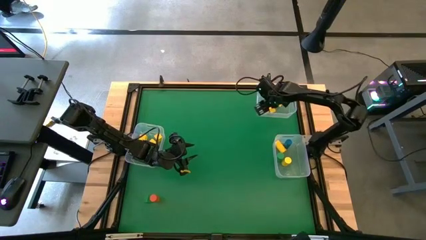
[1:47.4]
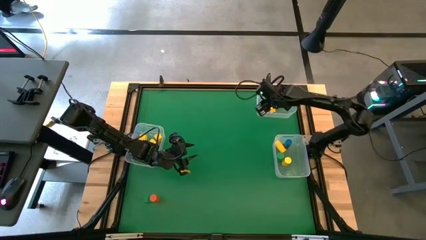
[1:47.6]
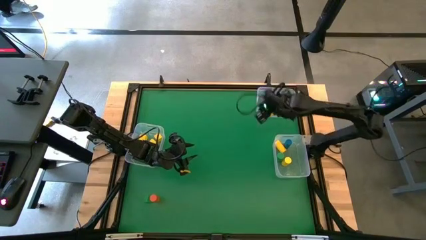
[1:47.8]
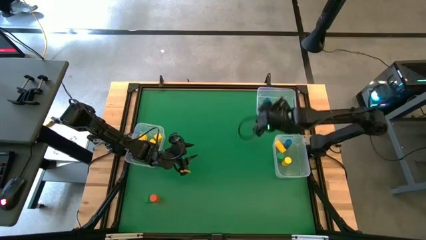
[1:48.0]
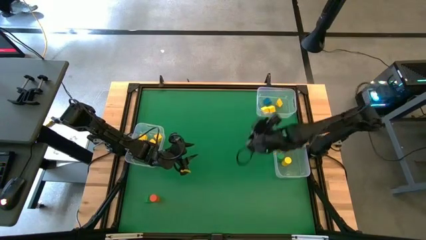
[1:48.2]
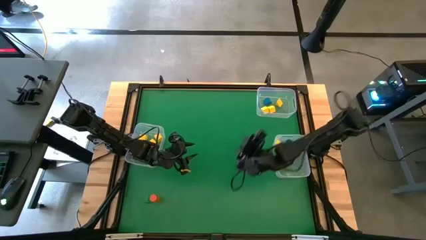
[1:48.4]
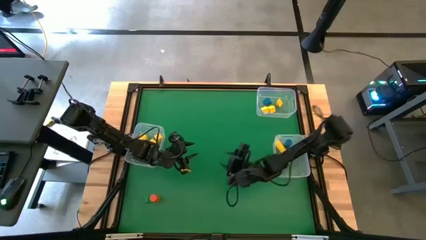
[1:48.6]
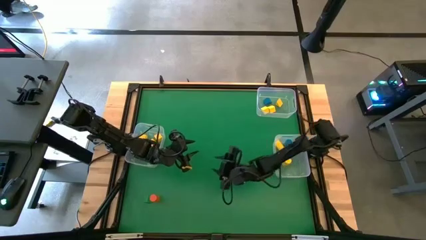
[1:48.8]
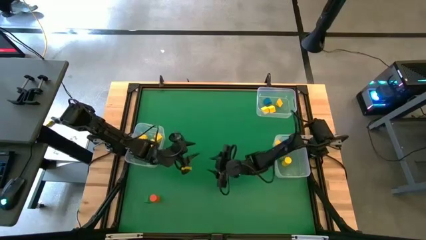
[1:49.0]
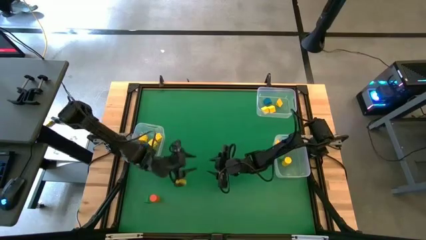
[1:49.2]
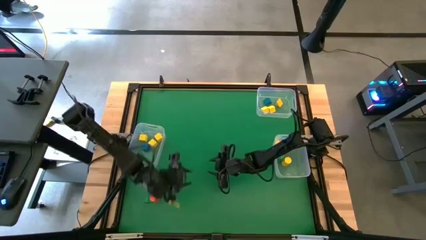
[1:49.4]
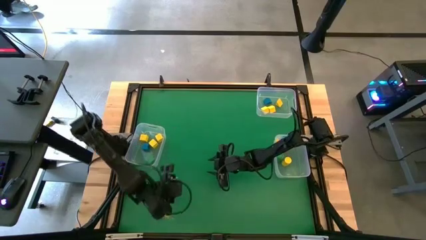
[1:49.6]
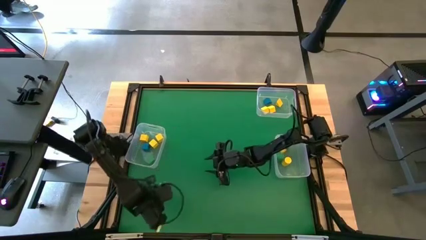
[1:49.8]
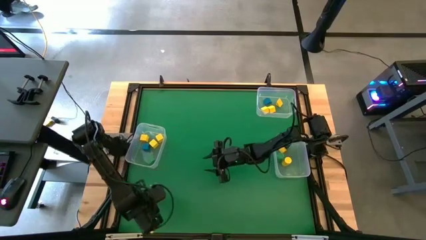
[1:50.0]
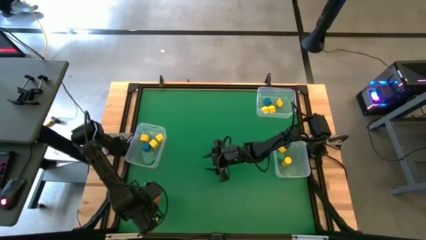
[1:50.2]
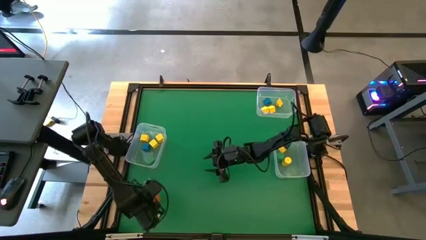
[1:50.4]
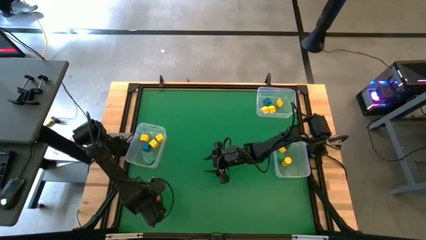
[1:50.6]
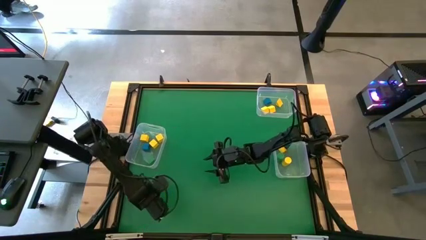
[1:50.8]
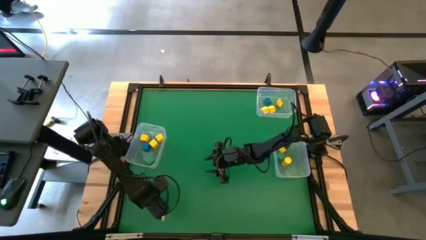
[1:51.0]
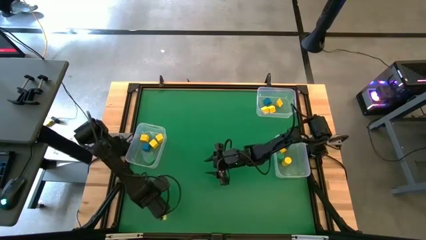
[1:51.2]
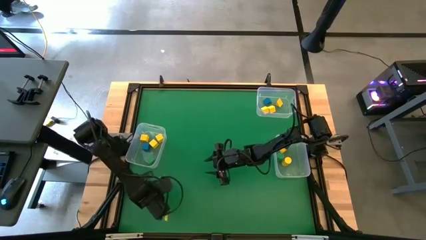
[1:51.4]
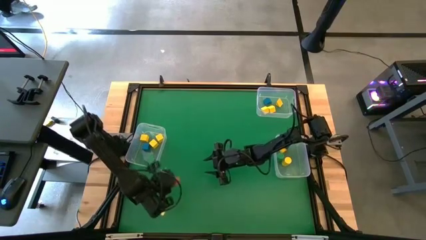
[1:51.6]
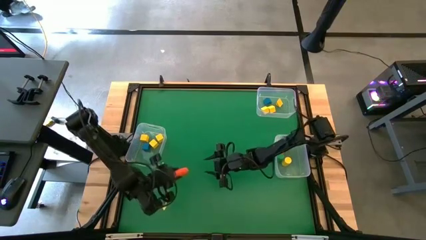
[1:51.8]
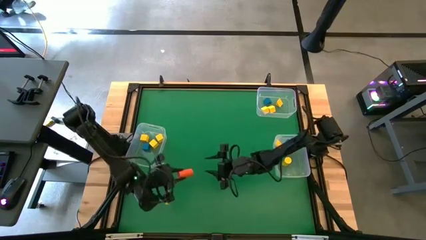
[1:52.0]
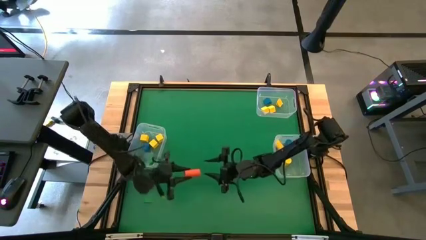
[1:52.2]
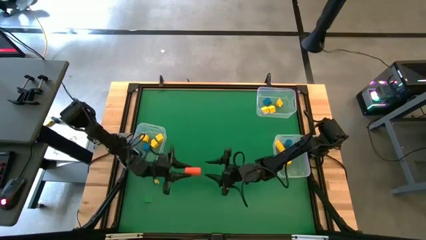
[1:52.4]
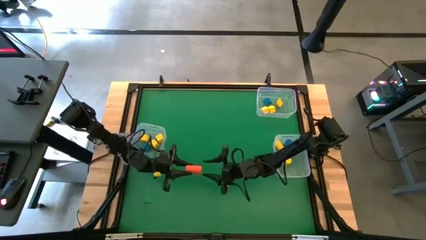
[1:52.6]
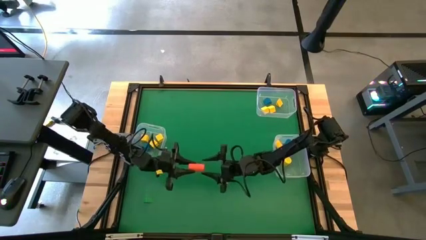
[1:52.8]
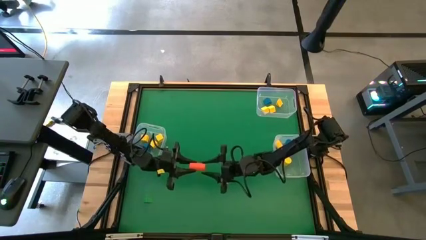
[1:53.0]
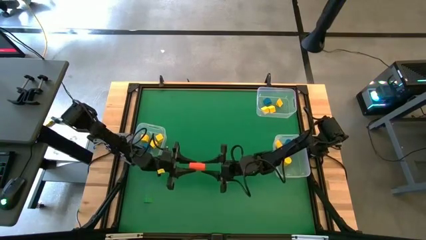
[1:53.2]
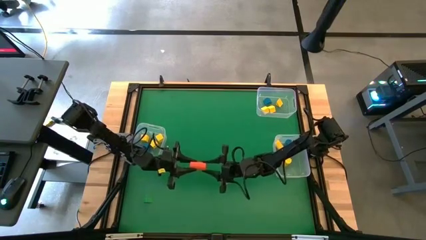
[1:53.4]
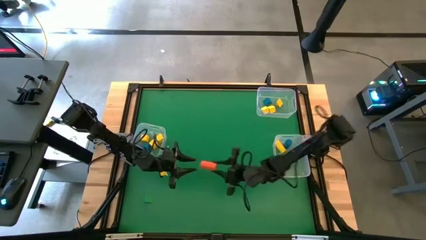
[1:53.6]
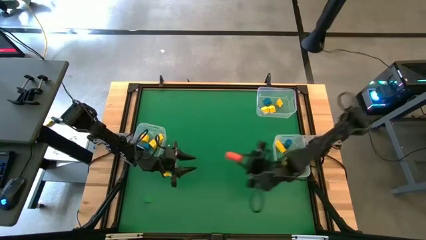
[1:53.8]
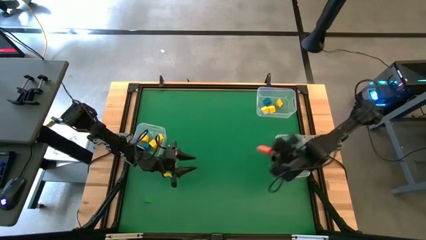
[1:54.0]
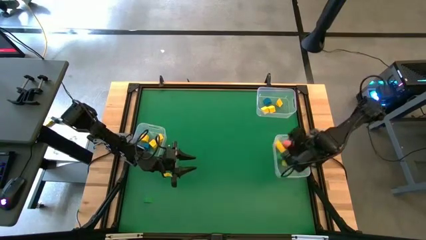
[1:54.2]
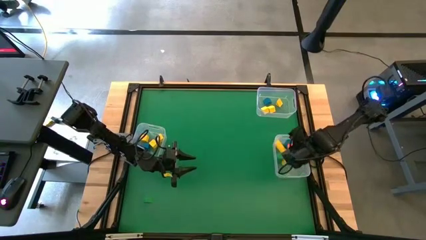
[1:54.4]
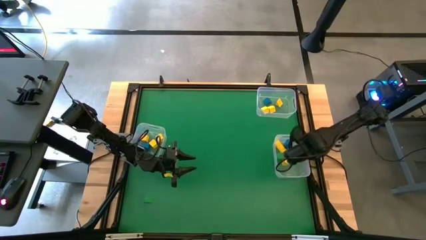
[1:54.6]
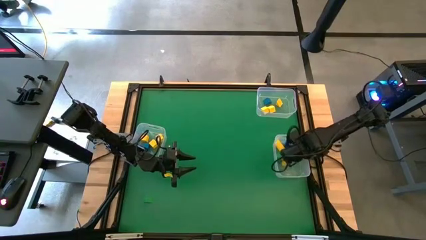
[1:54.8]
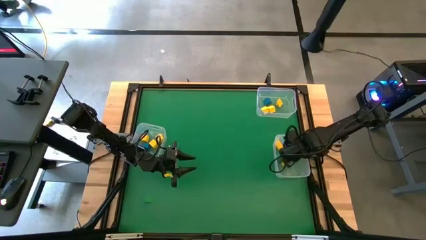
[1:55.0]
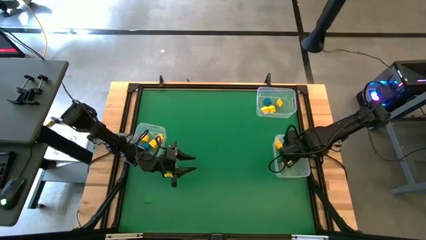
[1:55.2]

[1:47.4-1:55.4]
Task: Sort blocks by size
Put the orange cylindrical block into the bottom right transparent bin

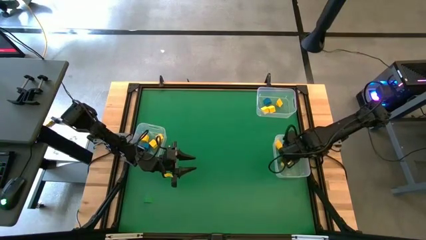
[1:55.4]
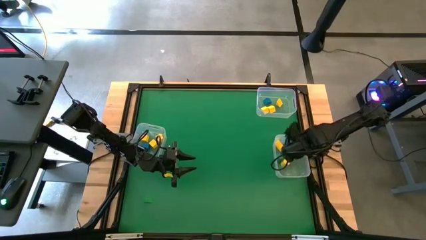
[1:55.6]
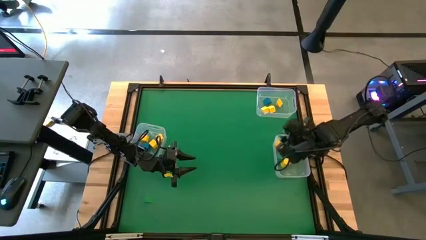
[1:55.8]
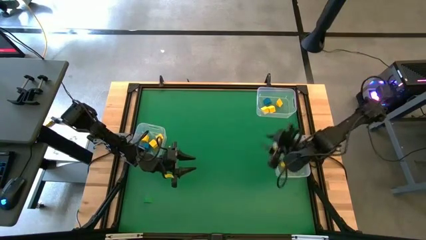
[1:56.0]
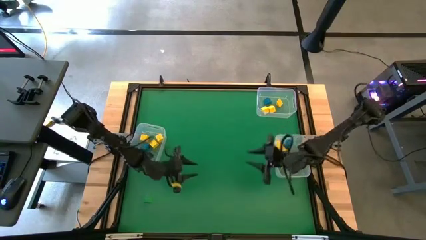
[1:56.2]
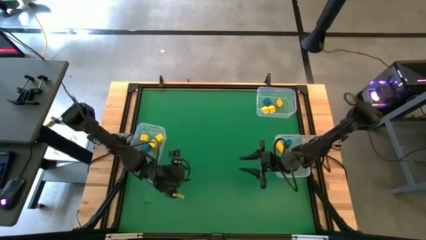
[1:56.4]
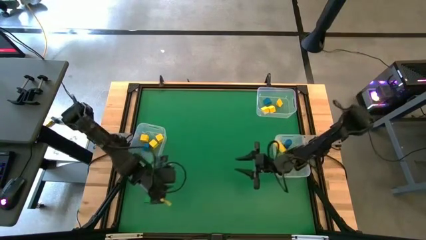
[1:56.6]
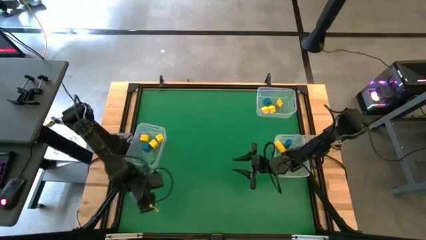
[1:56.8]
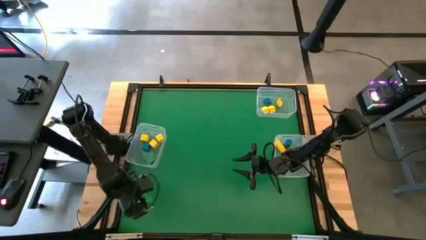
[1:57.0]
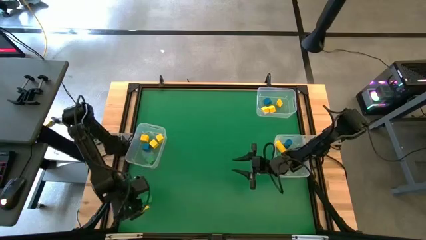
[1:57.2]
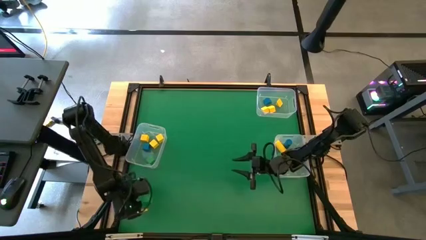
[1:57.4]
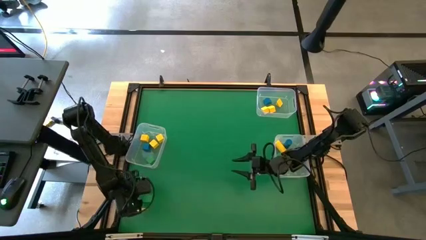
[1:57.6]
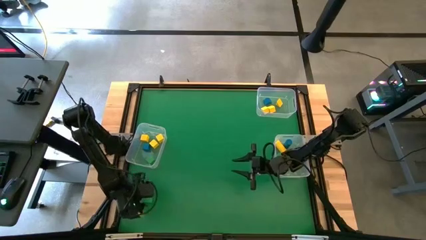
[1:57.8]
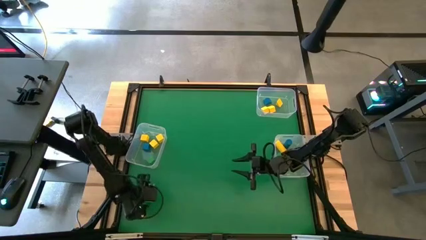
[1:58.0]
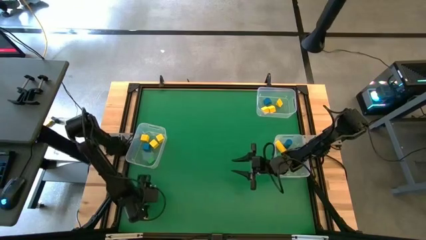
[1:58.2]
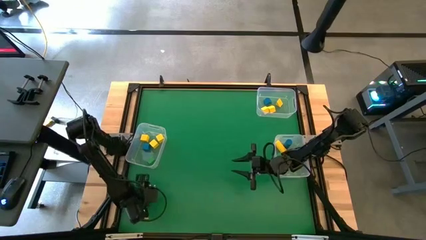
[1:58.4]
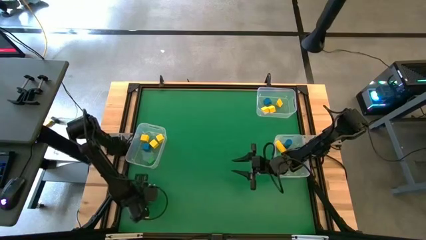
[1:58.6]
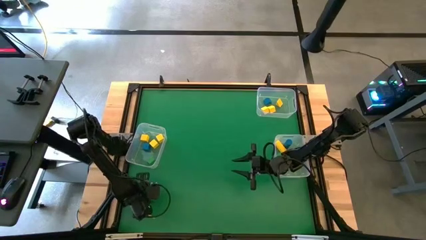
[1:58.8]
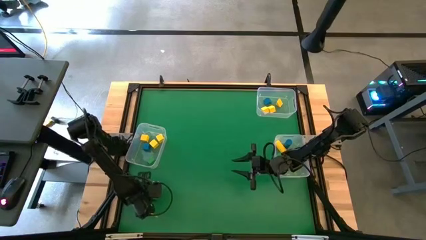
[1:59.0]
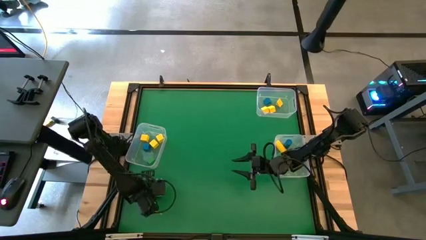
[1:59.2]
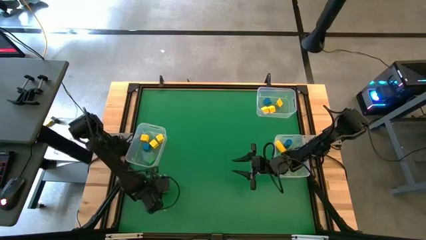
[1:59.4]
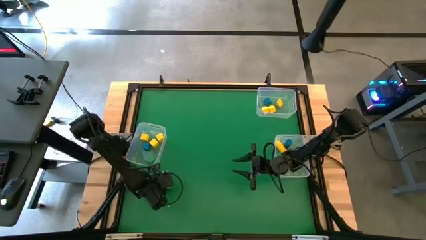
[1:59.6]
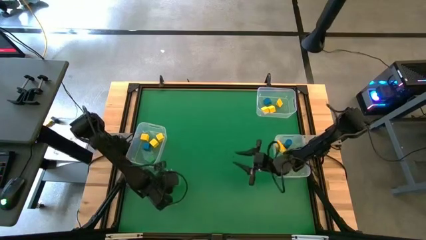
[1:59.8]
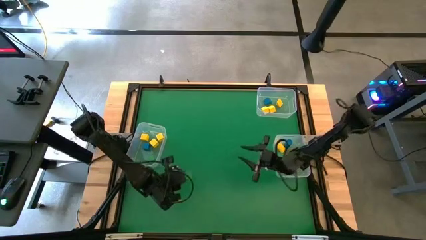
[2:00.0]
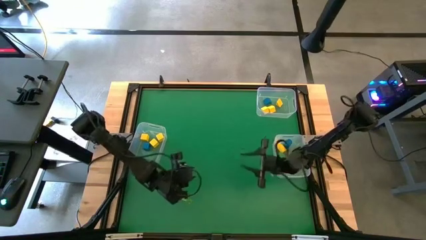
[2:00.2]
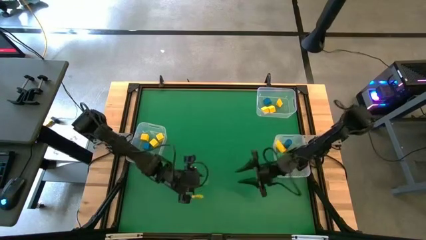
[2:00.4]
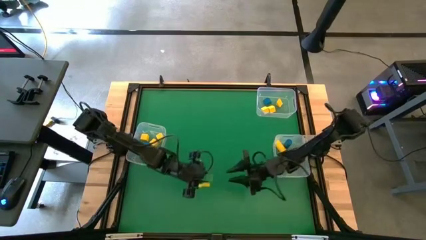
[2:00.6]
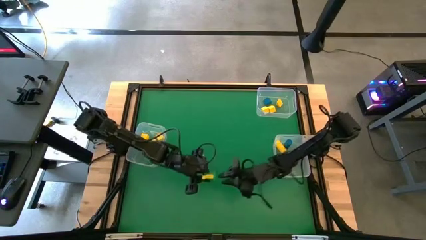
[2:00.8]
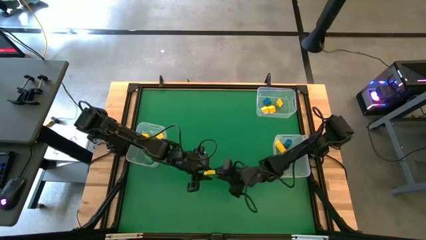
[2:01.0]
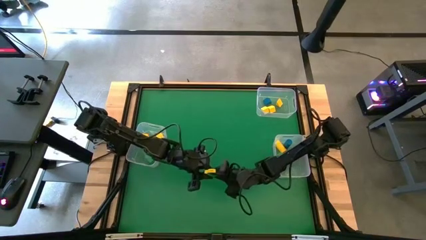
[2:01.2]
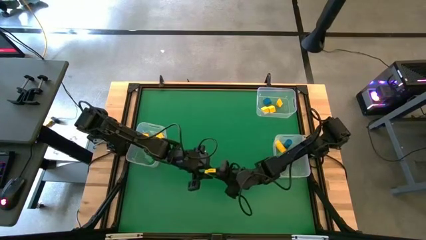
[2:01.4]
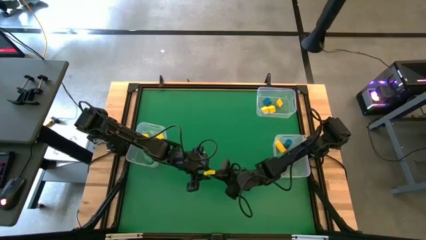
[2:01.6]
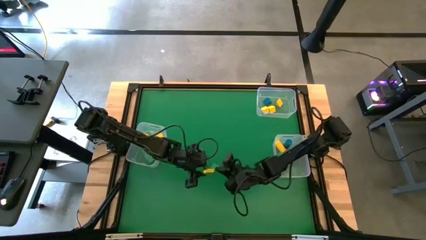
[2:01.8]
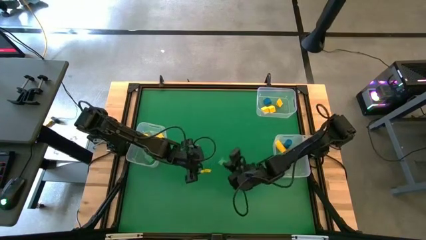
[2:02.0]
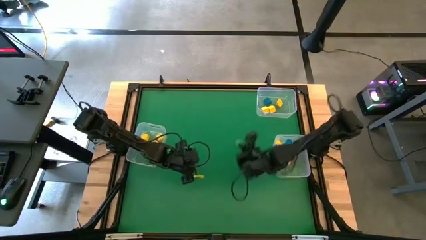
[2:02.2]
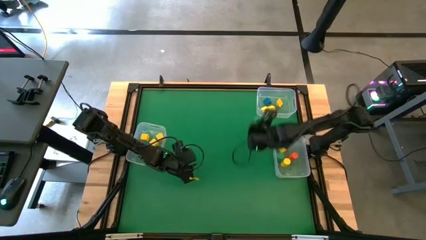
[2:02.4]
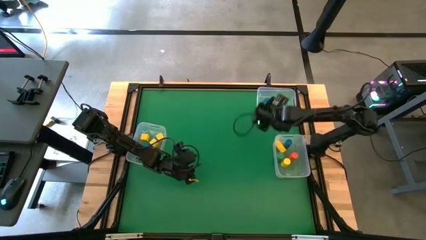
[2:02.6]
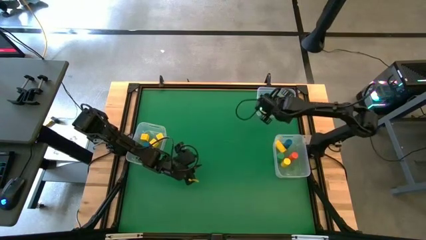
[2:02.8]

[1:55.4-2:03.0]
Put the green triangle block into the top transparent bin
